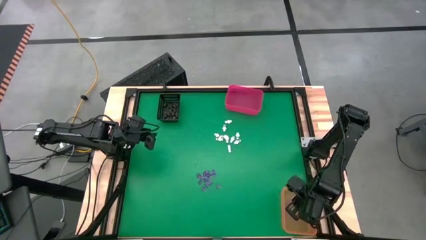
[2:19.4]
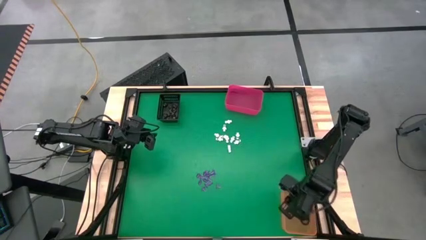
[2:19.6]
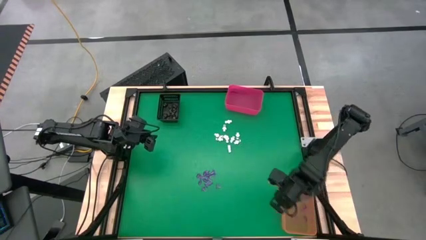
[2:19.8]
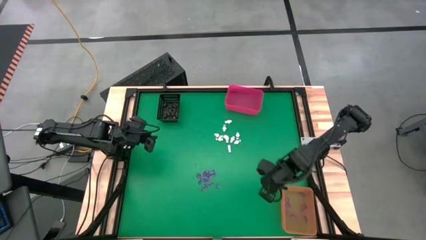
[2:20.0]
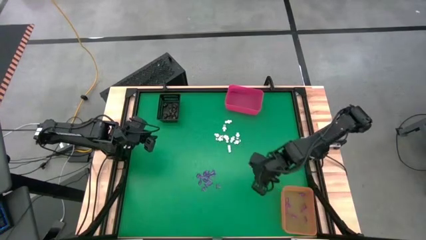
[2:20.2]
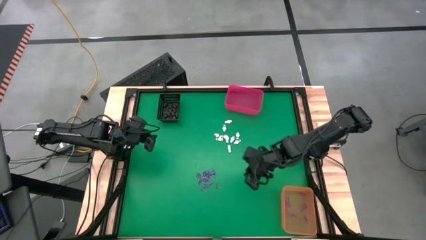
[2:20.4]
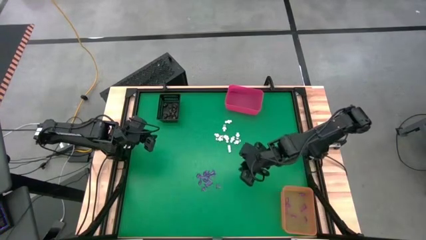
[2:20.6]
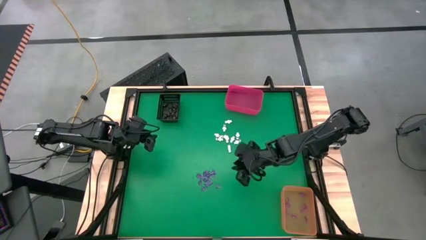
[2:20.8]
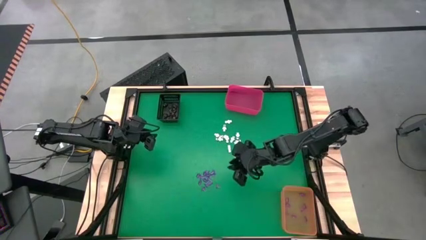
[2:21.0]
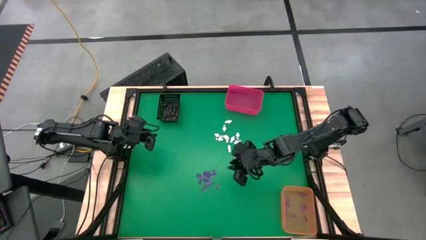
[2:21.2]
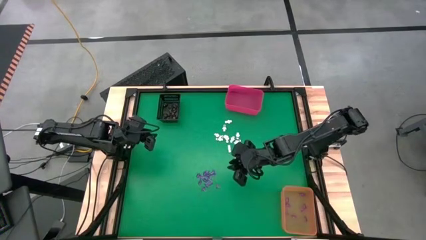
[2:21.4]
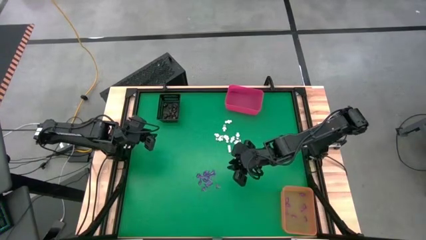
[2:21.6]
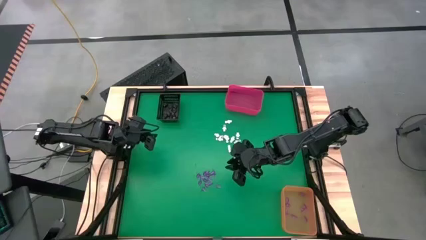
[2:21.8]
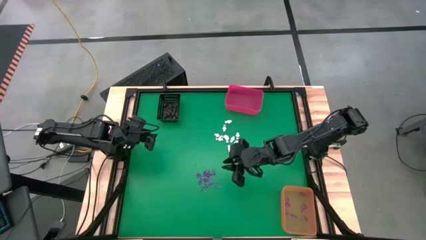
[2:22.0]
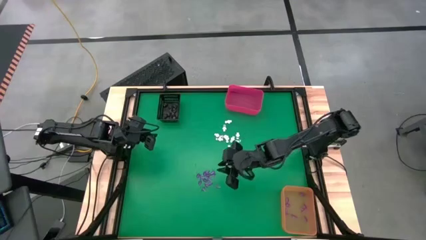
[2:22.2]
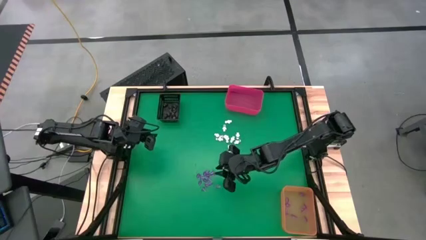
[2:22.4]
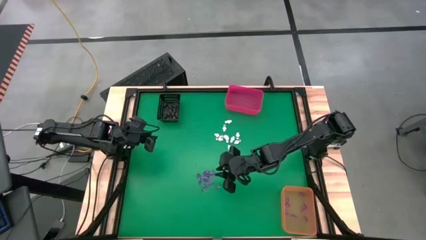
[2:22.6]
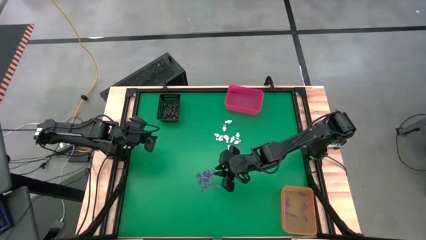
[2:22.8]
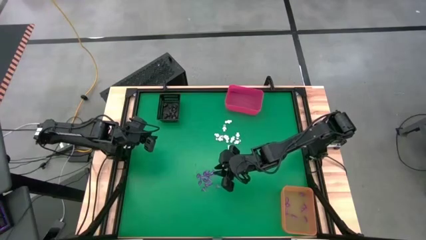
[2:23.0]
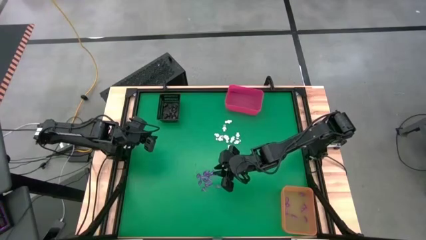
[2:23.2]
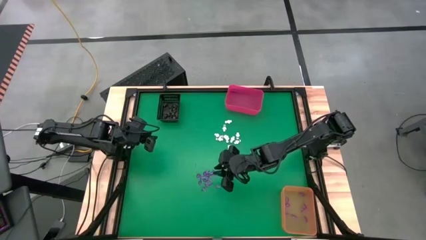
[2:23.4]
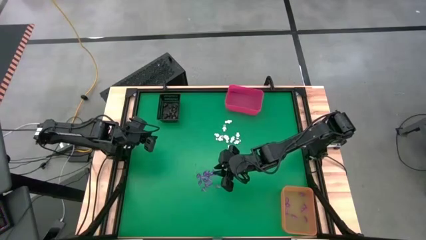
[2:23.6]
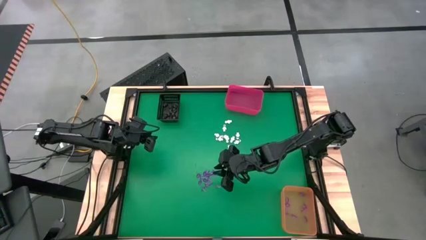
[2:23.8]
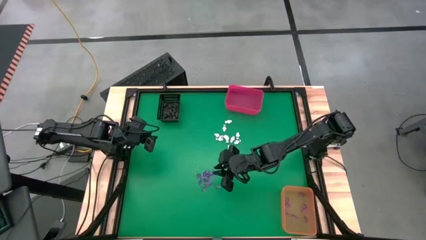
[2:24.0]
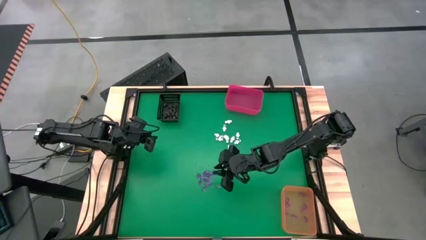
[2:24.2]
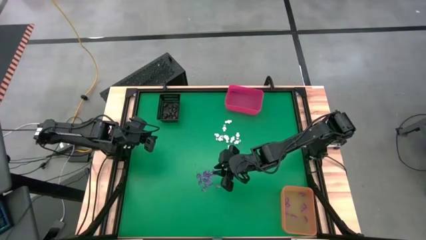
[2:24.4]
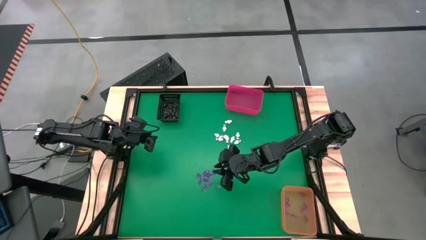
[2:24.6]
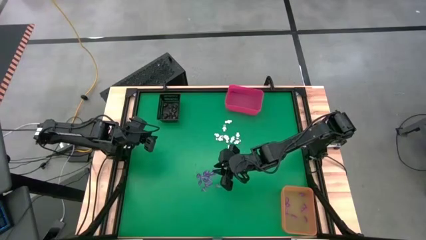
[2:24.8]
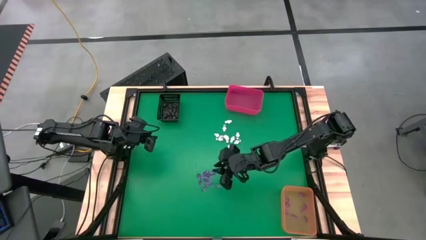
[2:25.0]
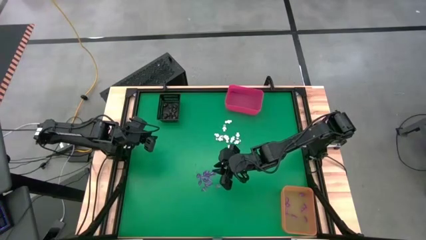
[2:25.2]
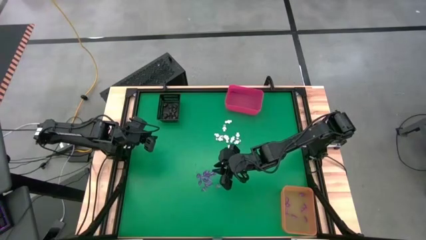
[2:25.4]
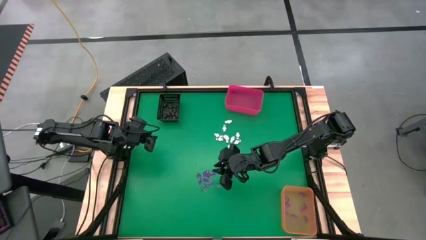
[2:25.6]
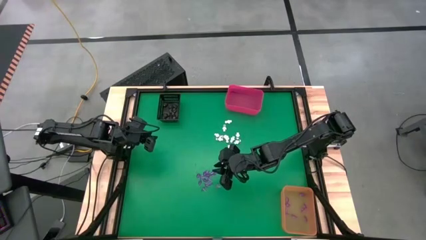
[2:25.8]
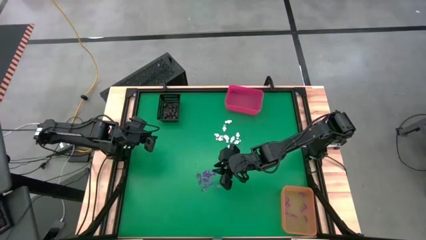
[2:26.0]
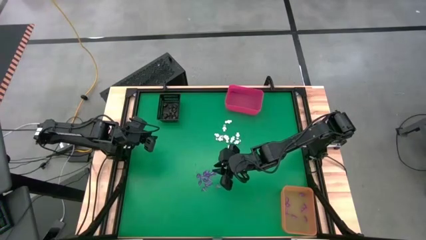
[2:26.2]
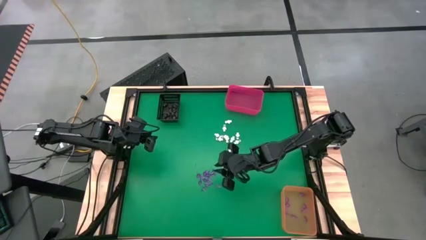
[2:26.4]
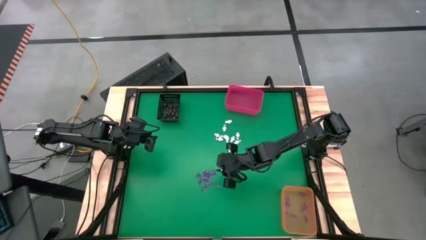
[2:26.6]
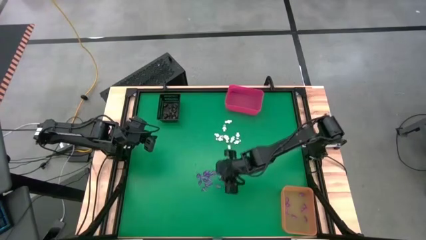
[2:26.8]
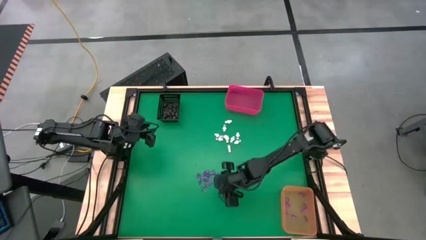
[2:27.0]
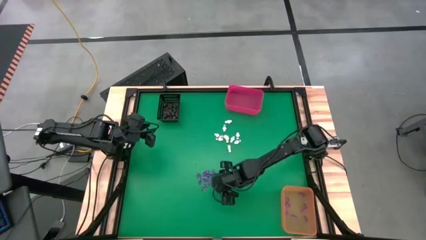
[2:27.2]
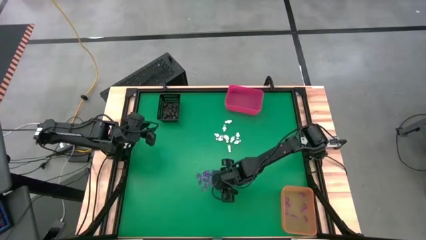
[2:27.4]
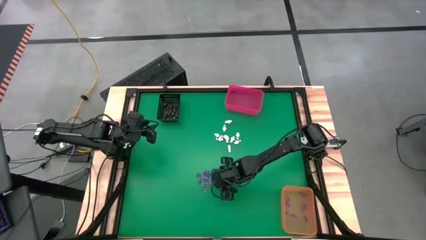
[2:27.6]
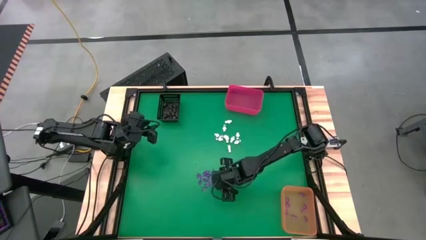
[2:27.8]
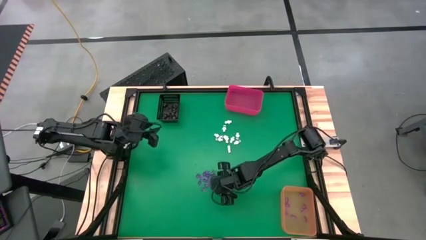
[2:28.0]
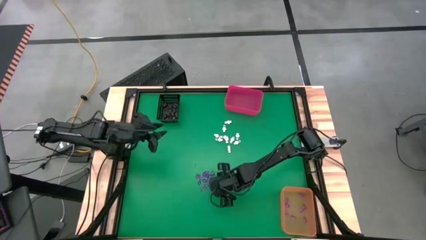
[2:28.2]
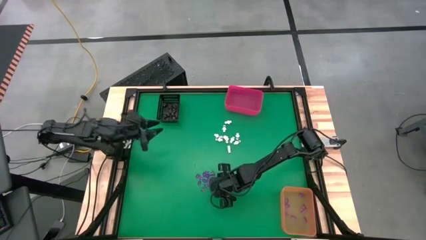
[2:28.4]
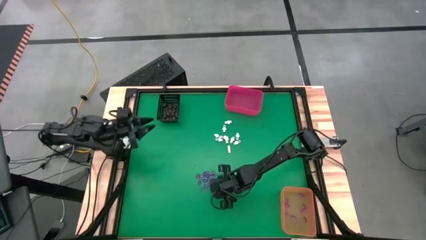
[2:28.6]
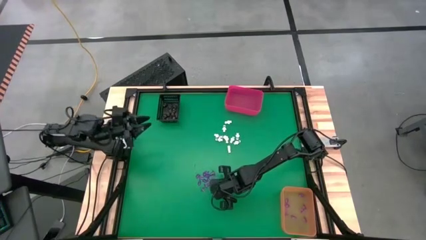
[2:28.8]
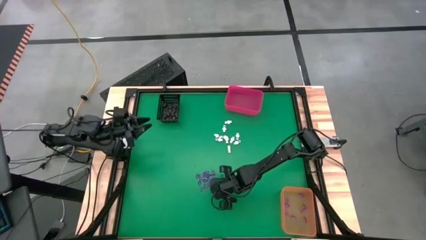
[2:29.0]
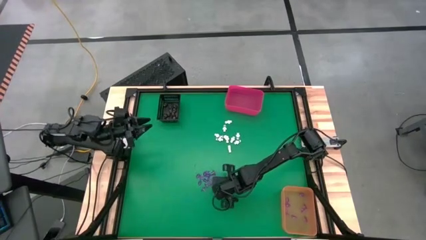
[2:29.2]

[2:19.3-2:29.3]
Task: Sort Halloween decoration
Put the pink witch hat toy into the orange bin

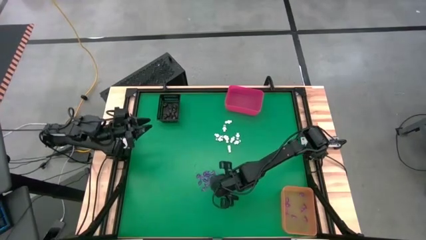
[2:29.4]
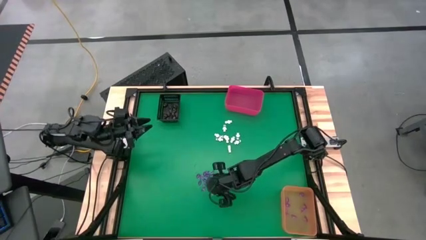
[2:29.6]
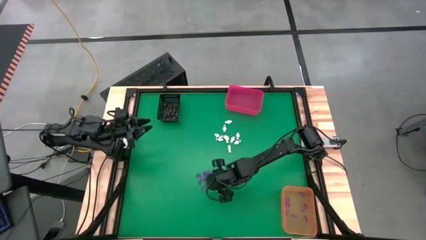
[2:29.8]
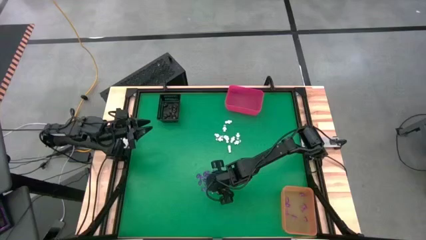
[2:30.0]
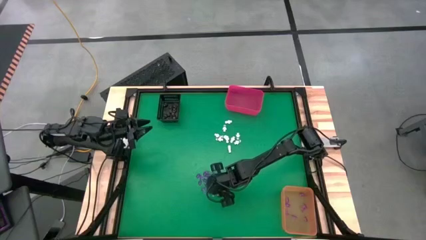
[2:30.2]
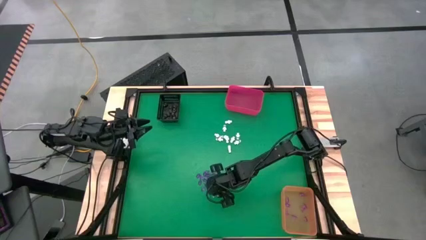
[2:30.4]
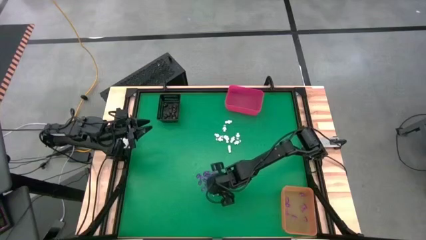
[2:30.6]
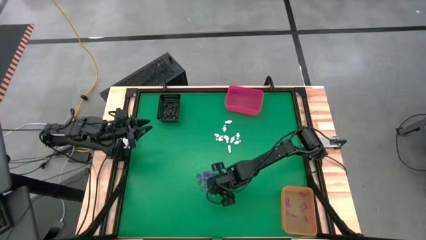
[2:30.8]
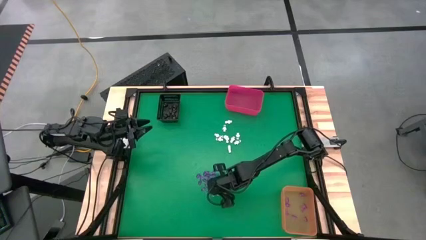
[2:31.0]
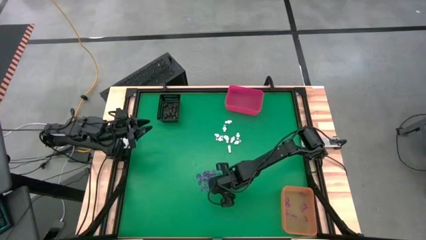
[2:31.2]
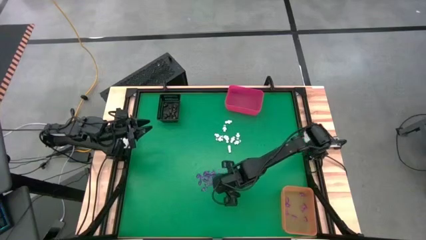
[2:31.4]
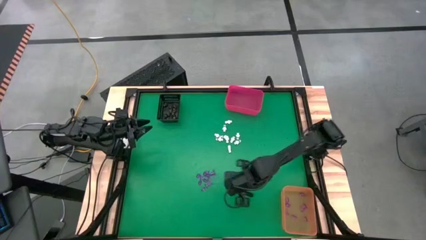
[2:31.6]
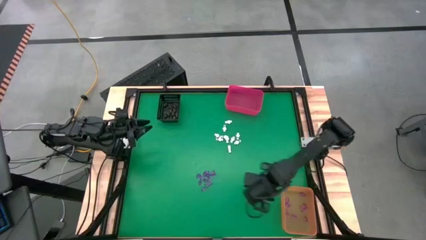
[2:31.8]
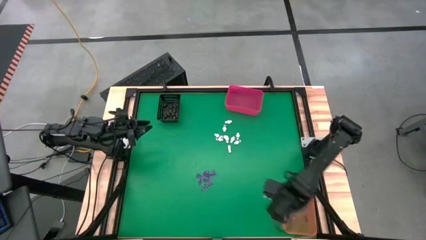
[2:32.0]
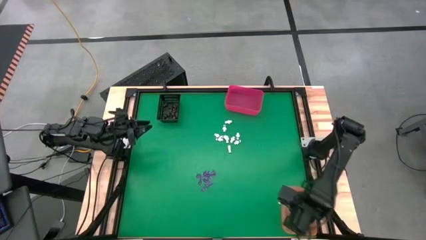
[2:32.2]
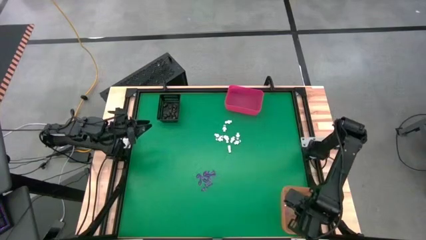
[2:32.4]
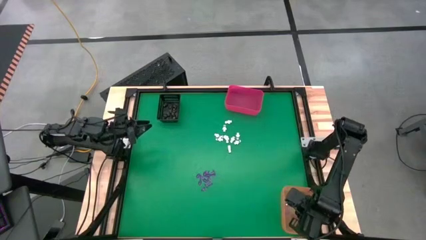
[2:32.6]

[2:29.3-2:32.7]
Put the pink witch hat toy into the orange bin

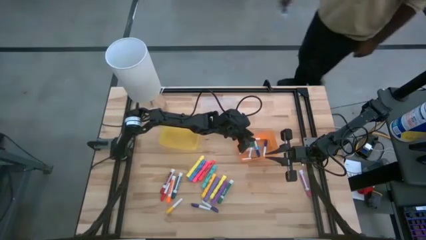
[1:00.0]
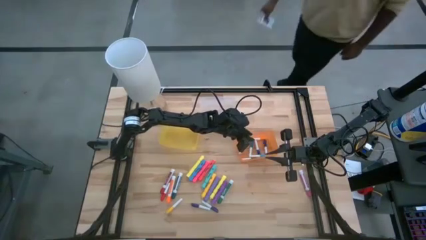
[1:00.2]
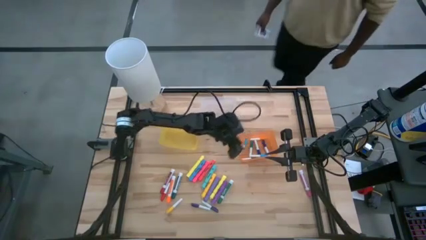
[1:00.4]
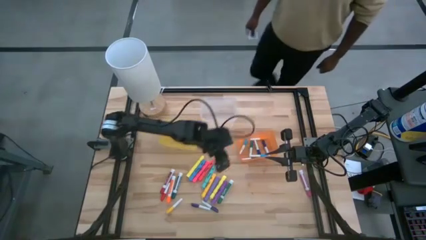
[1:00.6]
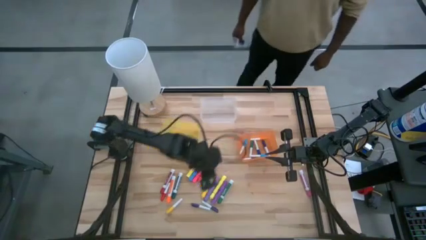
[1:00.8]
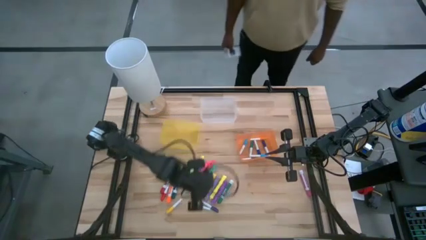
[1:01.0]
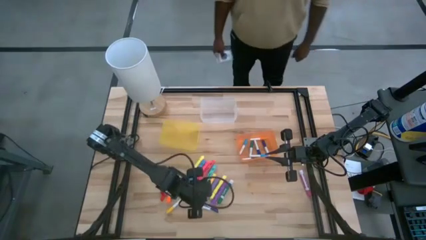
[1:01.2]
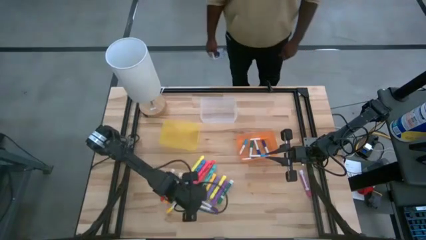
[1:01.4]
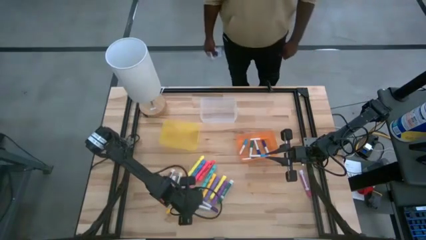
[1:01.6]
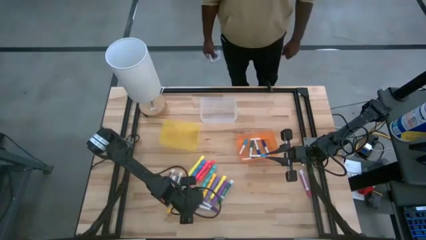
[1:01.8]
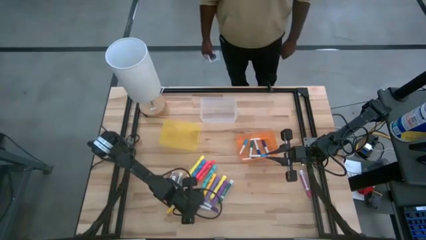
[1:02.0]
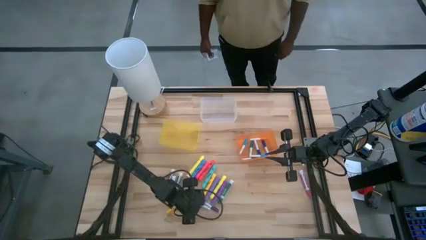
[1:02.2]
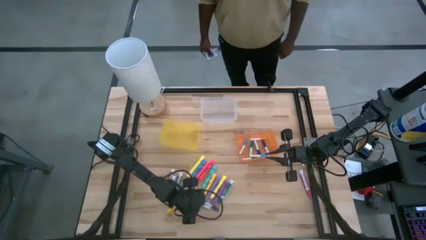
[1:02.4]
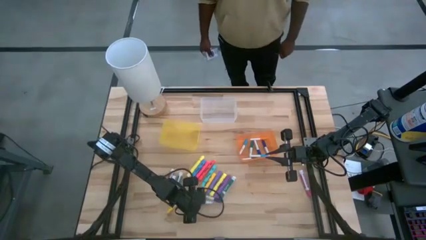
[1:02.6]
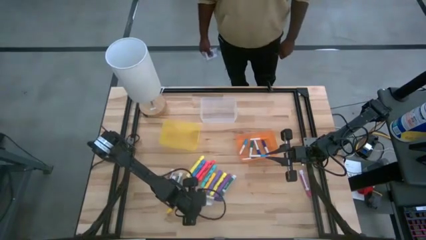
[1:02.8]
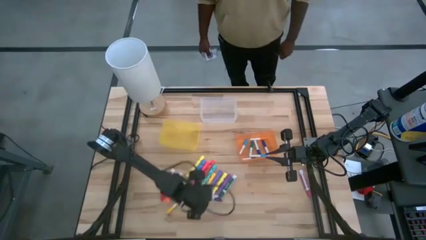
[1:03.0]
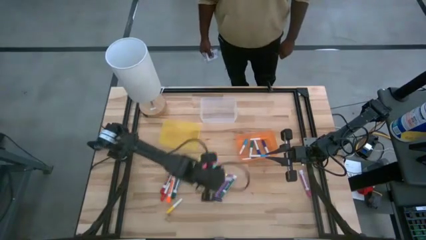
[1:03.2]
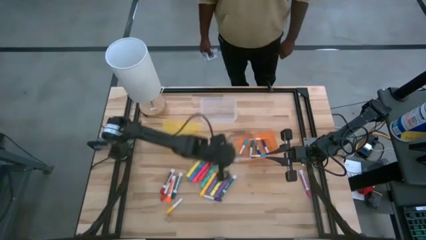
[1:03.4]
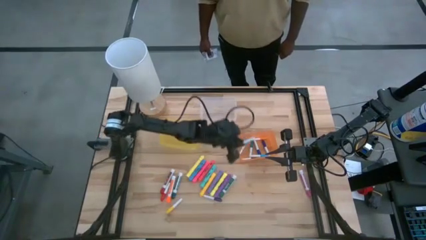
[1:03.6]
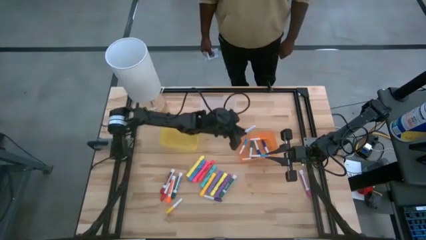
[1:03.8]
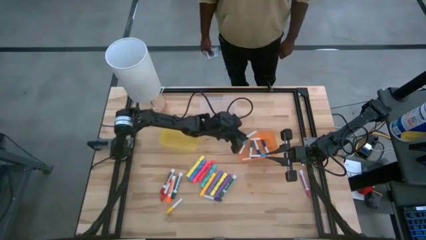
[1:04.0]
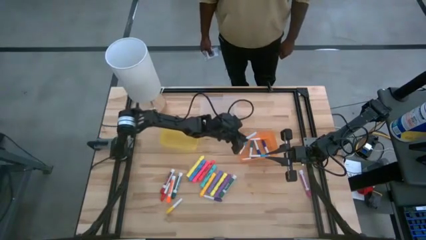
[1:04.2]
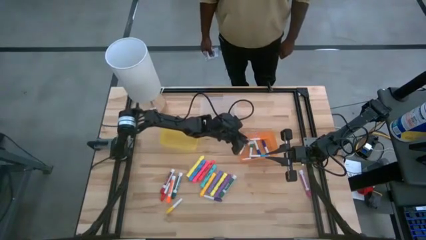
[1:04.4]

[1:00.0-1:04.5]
Task: Pick & Place Markers
Put the bottom small violet highlighter pen into the orange bin
